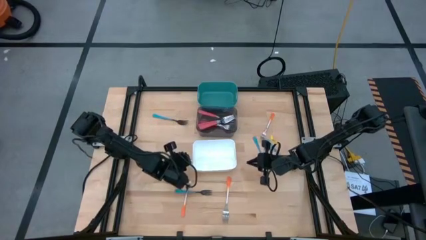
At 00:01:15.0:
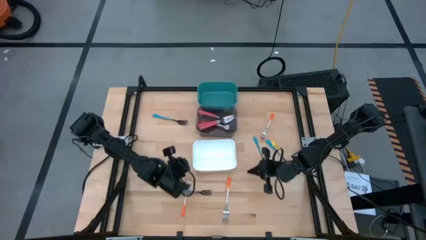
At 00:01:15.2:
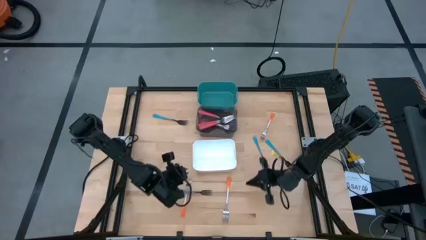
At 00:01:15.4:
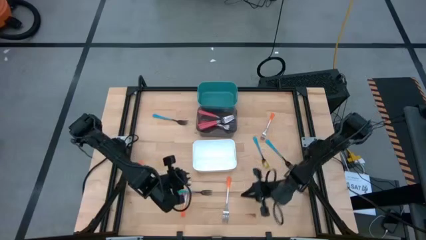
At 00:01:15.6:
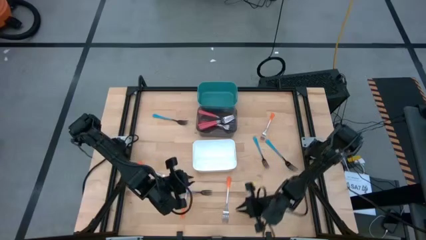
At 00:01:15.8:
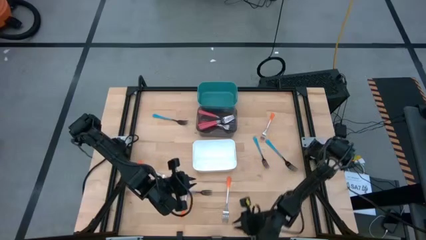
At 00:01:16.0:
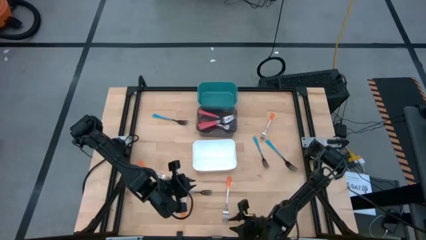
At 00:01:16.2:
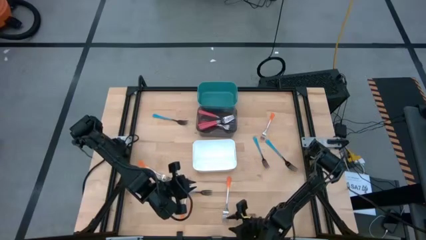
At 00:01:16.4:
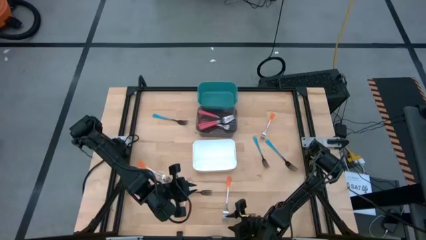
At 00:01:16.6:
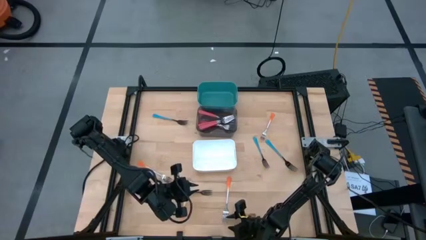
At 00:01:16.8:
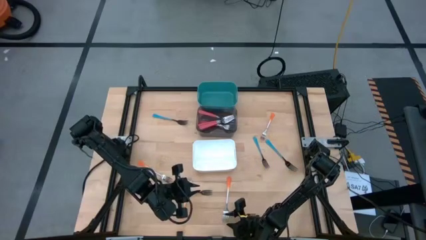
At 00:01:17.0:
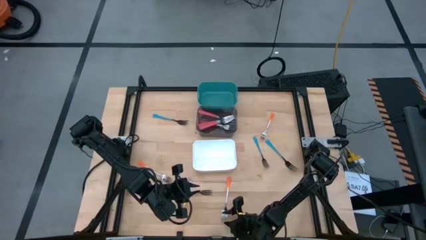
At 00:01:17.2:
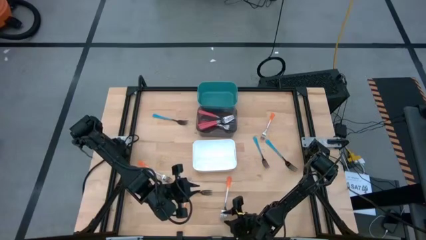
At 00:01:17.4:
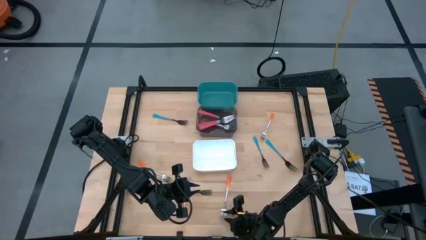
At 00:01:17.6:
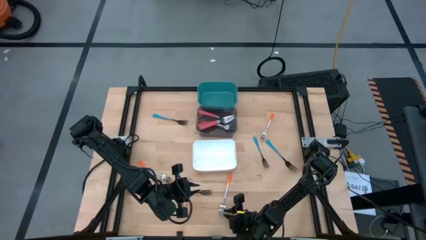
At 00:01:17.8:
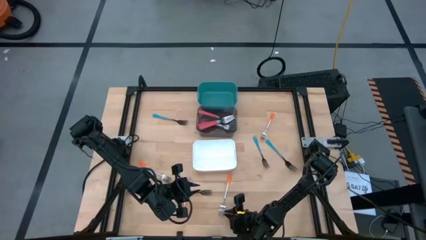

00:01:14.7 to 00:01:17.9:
Task: Sort silverware by color (type)
Put the orange fork into the white bin

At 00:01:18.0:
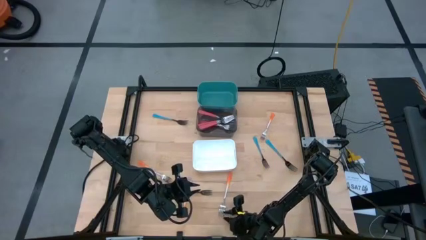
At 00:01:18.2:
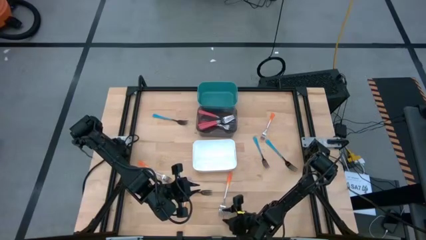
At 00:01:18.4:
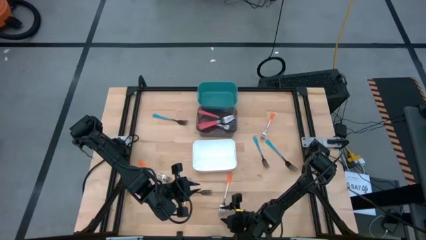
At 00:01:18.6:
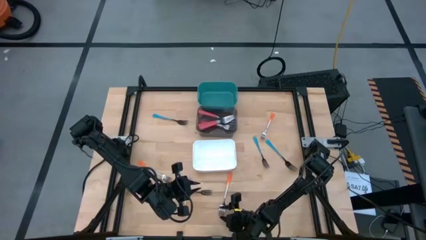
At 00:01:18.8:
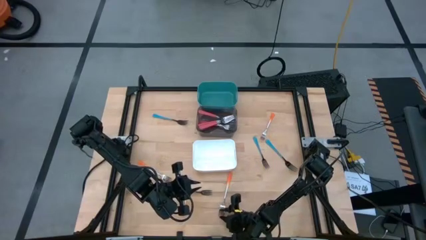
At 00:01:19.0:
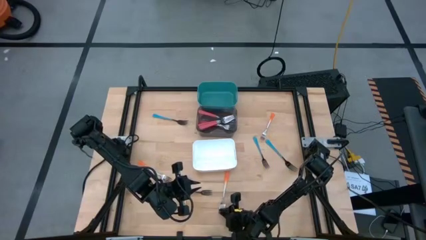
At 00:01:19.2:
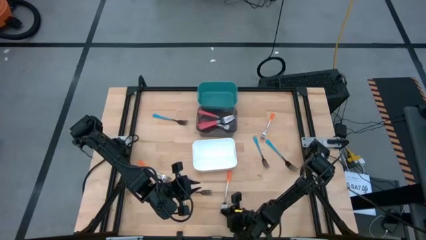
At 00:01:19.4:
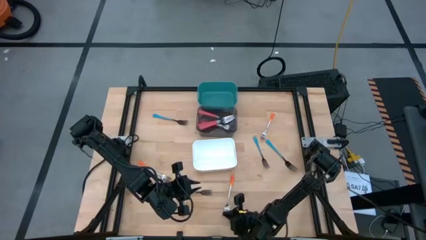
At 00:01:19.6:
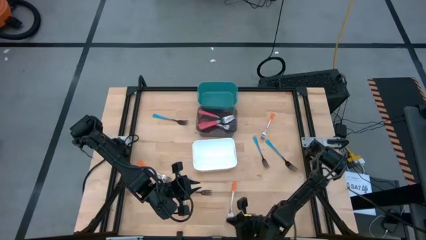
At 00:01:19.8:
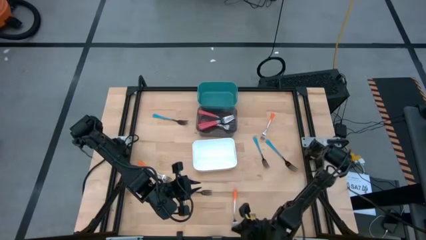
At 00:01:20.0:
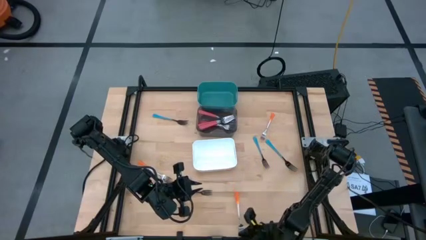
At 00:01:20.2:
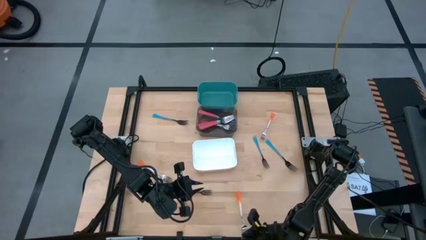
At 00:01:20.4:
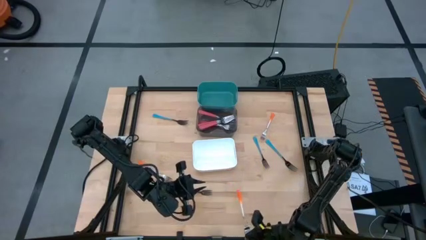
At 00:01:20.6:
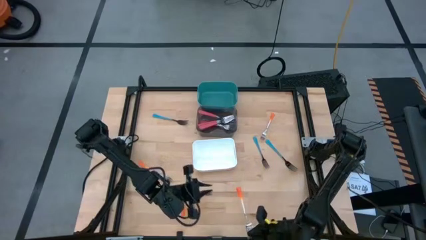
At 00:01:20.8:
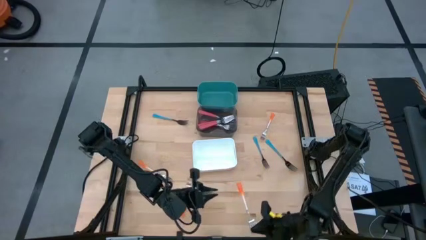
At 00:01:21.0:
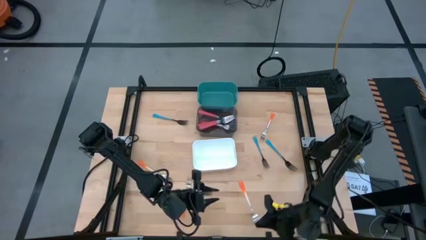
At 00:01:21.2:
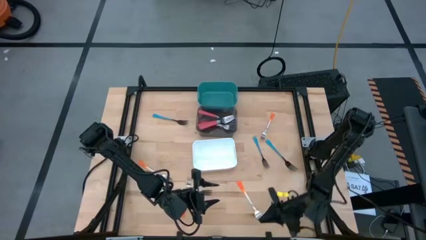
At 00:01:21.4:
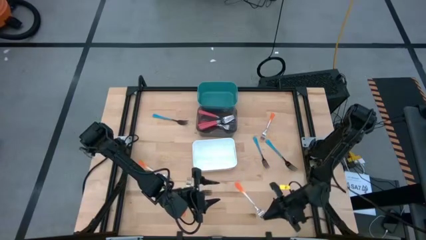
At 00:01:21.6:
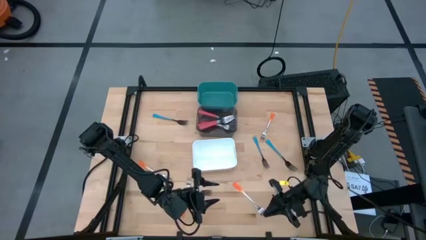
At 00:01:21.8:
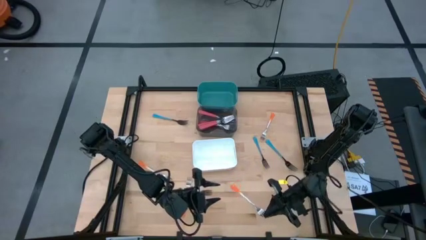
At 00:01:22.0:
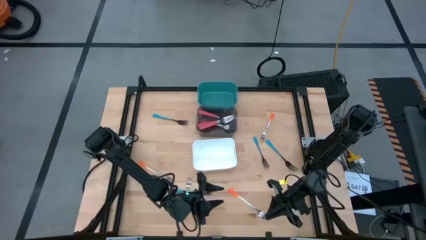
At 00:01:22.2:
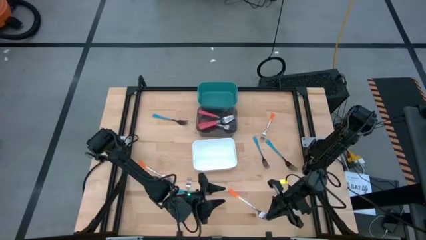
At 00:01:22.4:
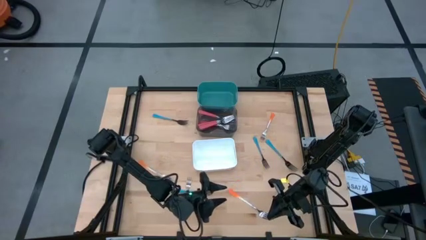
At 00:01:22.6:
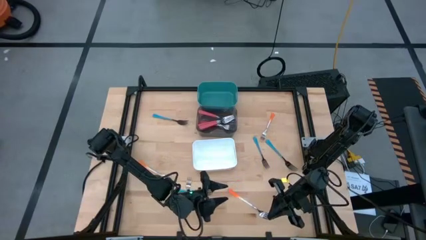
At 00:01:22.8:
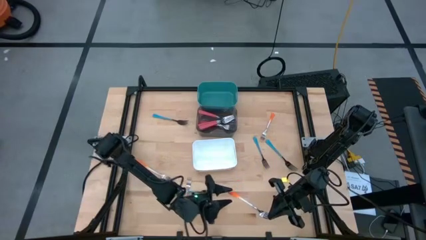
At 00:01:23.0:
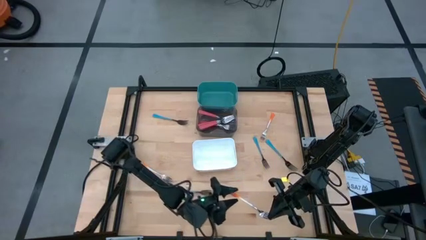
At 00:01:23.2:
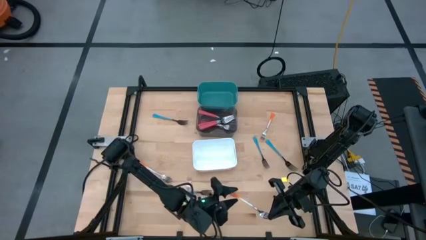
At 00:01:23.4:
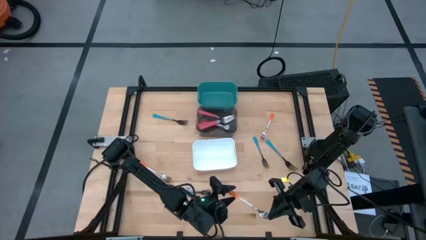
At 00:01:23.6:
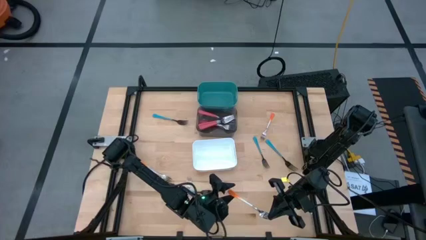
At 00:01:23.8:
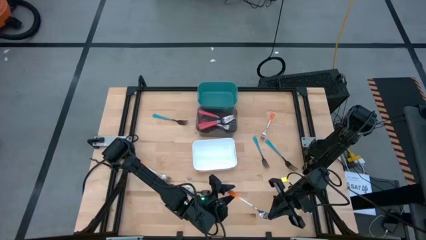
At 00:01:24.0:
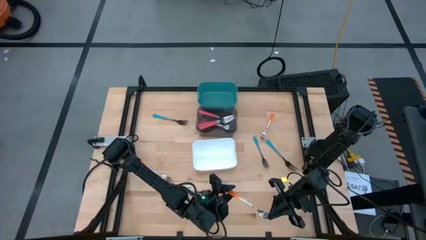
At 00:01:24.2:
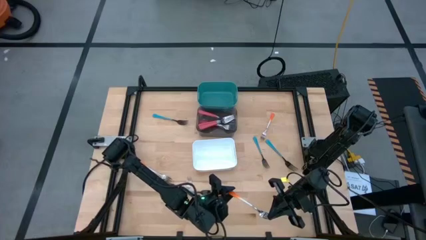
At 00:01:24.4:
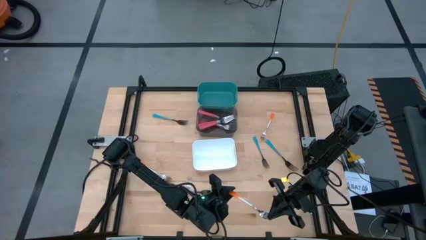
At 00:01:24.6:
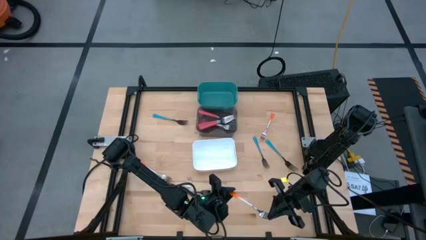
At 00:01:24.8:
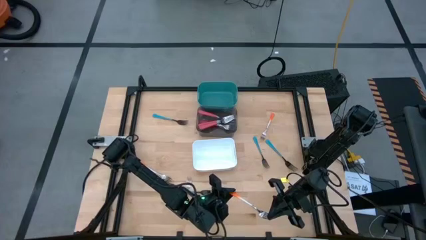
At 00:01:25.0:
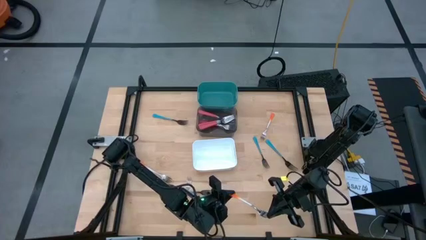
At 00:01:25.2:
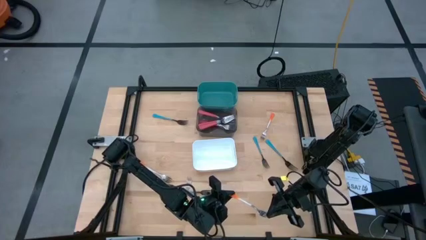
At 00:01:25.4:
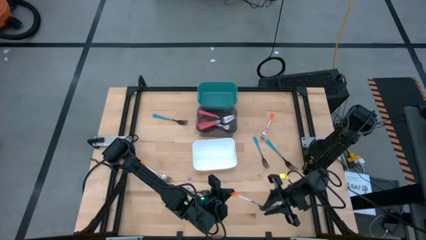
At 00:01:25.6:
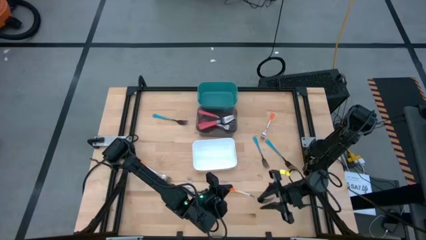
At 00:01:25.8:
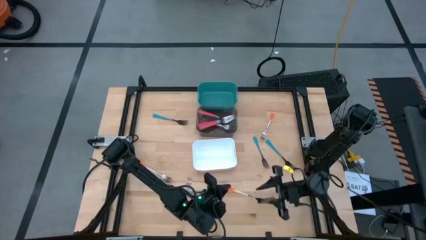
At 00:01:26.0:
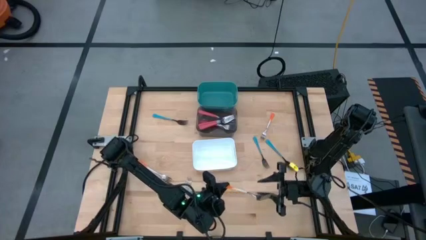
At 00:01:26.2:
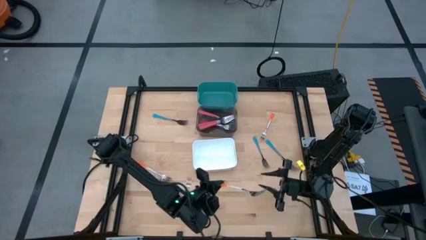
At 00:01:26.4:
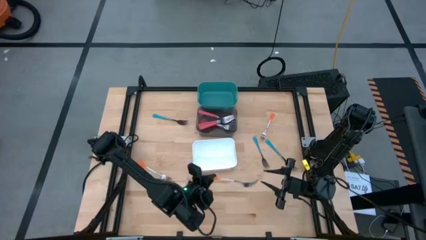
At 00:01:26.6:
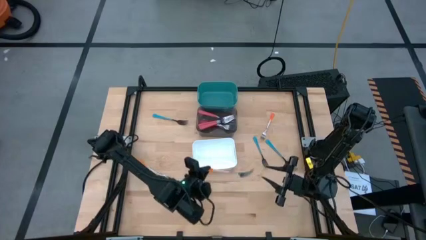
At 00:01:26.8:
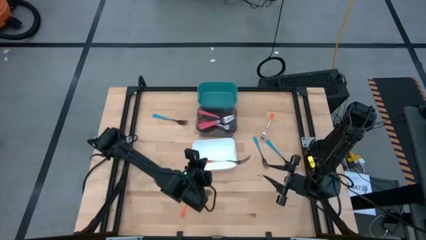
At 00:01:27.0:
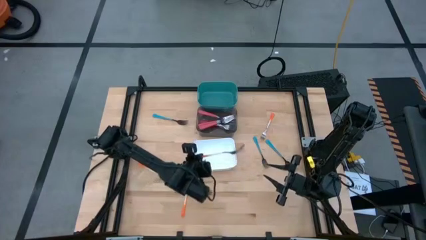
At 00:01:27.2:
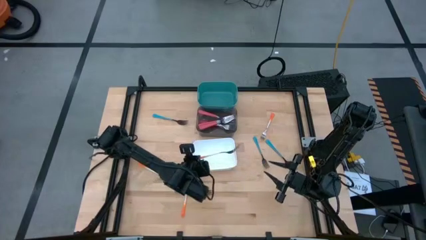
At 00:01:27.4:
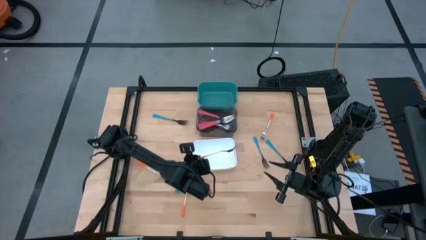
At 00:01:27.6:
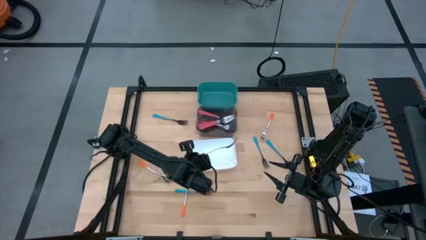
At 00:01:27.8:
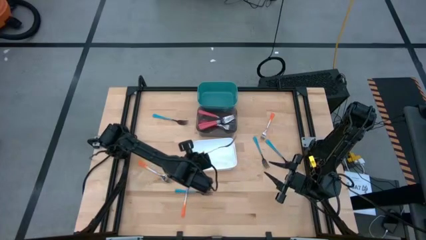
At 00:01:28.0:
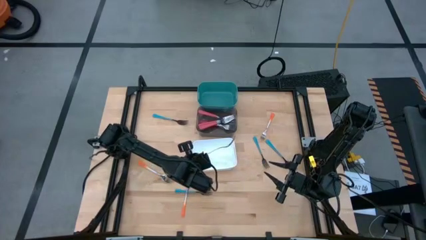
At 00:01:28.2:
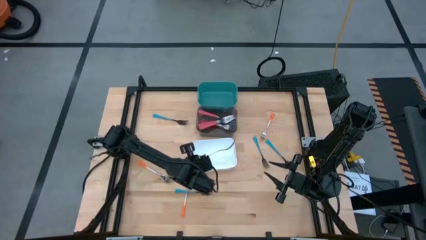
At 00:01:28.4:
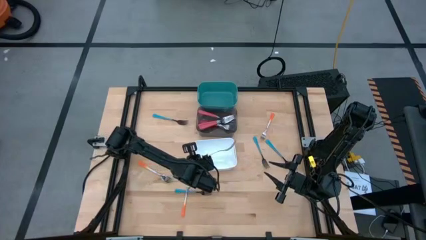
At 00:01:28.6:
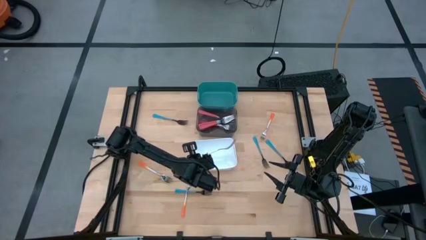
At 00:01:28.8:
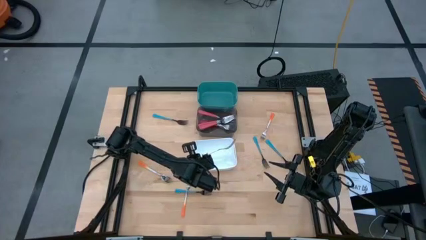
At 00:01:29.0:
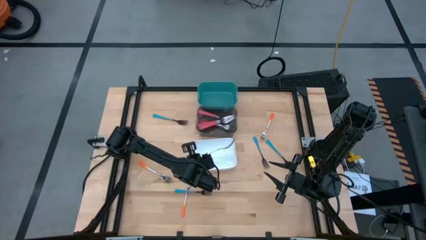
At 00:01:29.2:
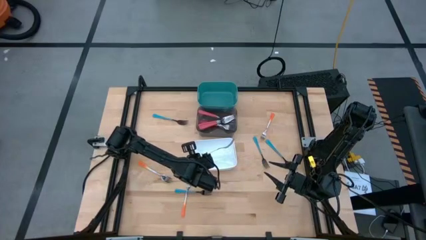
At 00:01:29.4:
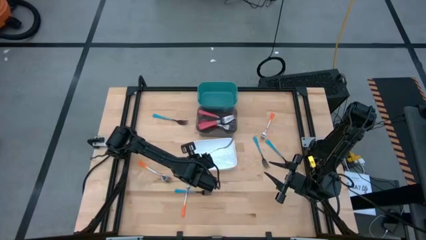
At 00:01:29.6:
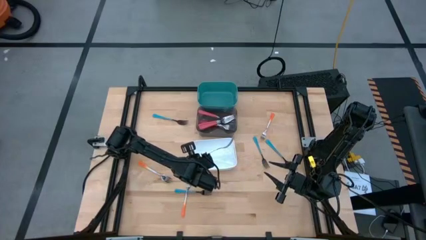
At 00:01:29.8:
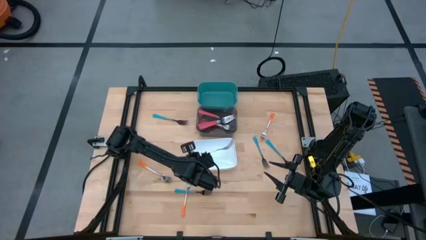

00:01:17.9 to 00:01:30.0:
Put the bottom right orange fork into the white bin
